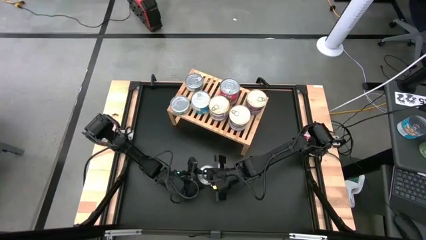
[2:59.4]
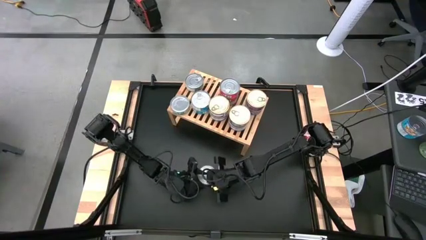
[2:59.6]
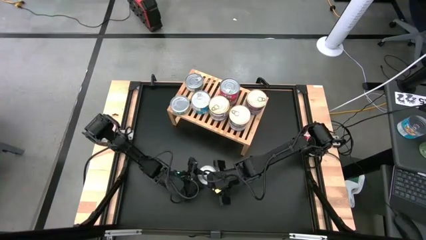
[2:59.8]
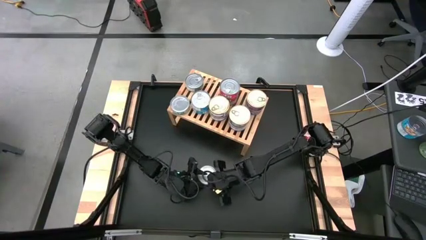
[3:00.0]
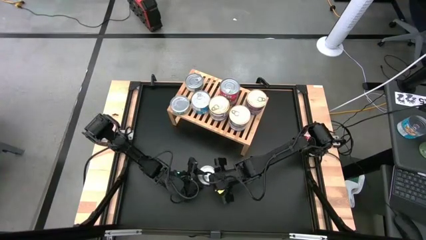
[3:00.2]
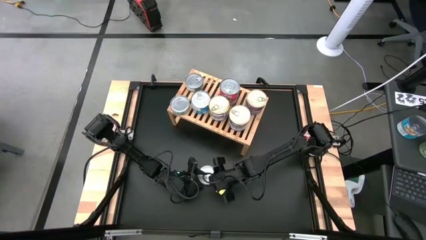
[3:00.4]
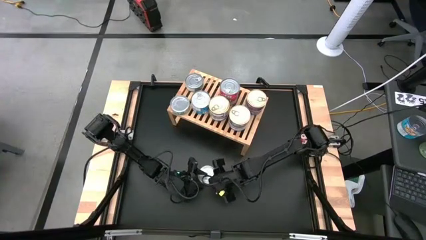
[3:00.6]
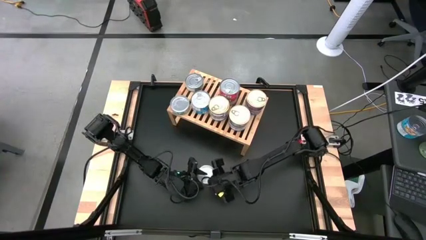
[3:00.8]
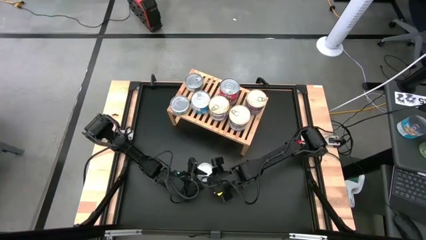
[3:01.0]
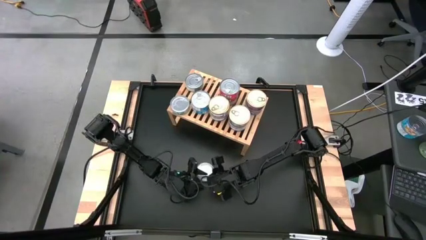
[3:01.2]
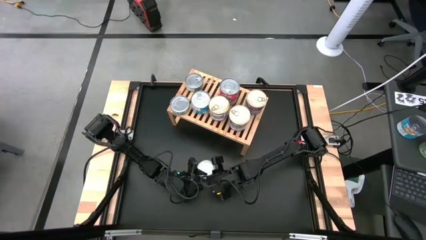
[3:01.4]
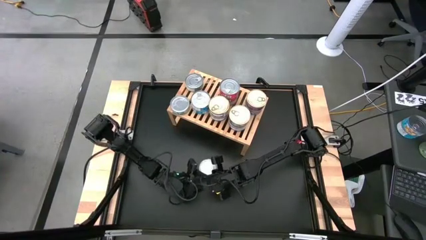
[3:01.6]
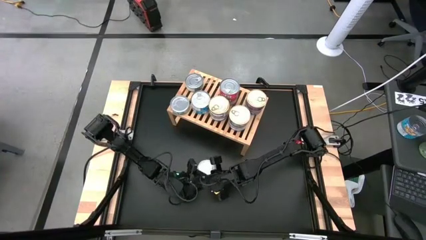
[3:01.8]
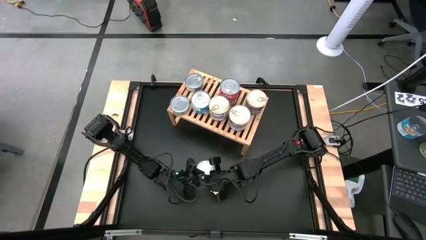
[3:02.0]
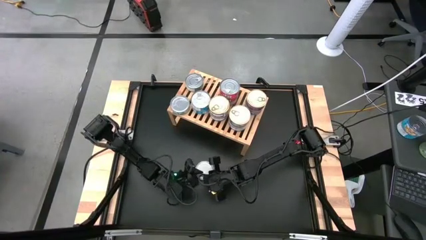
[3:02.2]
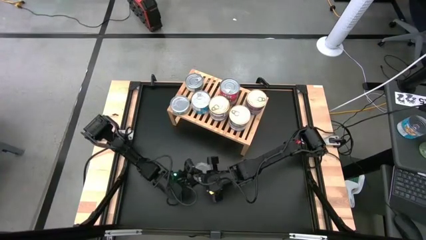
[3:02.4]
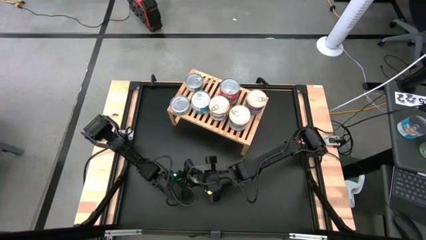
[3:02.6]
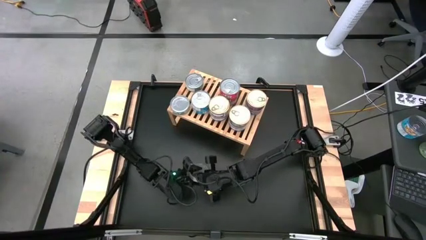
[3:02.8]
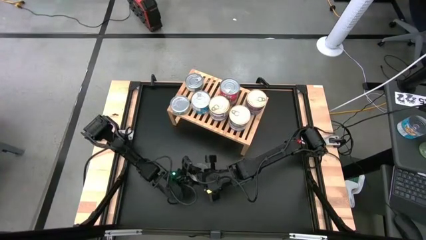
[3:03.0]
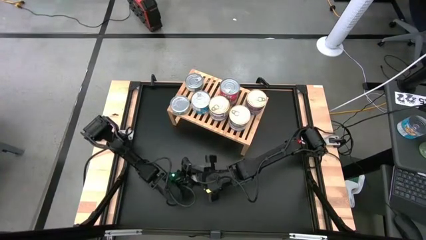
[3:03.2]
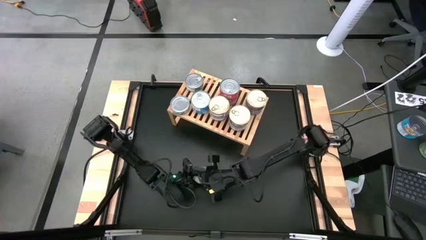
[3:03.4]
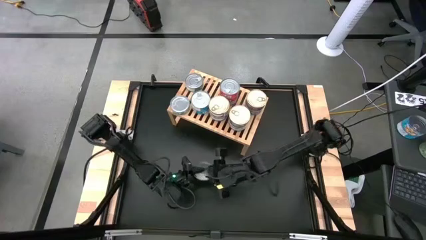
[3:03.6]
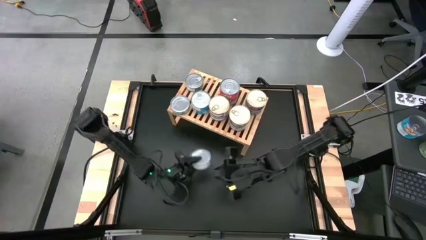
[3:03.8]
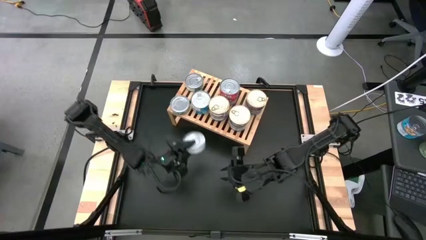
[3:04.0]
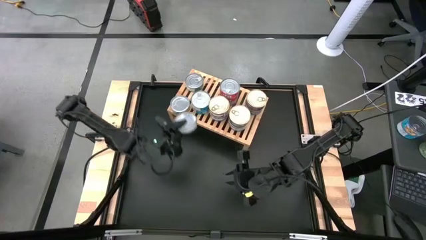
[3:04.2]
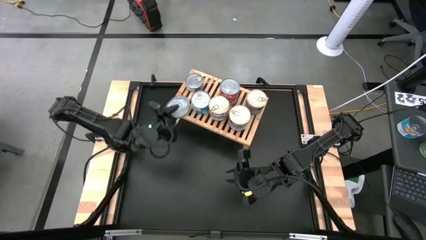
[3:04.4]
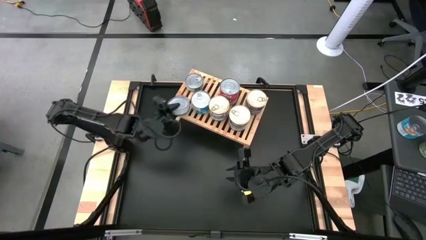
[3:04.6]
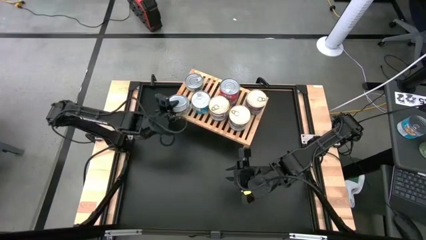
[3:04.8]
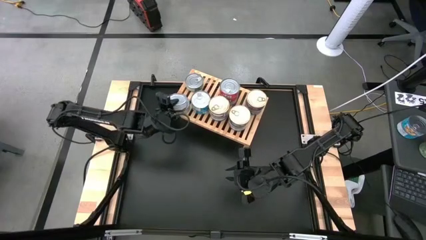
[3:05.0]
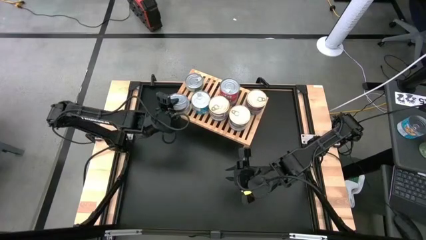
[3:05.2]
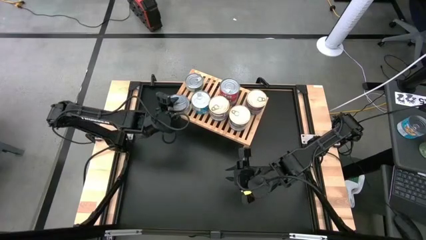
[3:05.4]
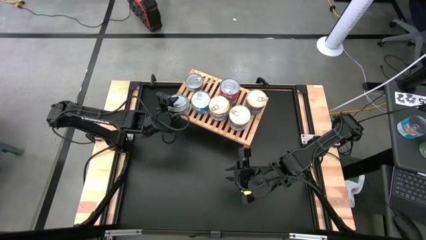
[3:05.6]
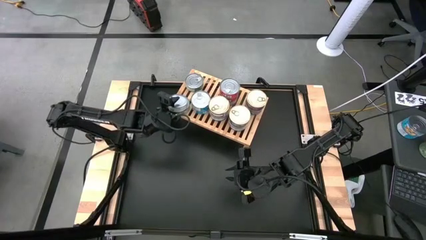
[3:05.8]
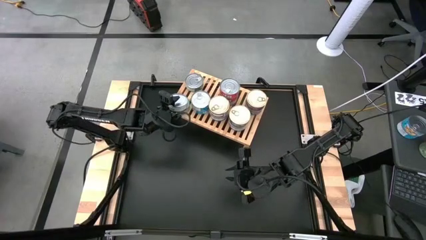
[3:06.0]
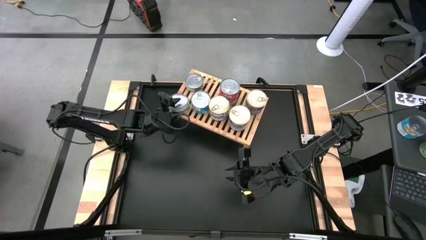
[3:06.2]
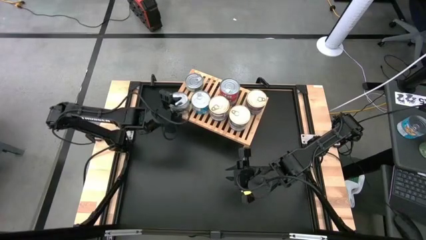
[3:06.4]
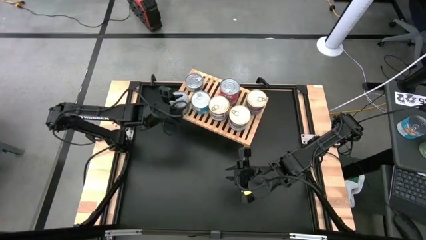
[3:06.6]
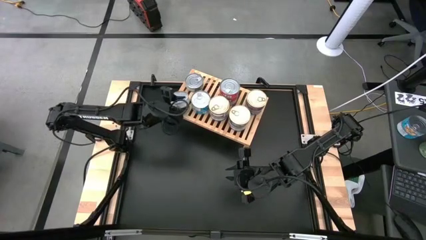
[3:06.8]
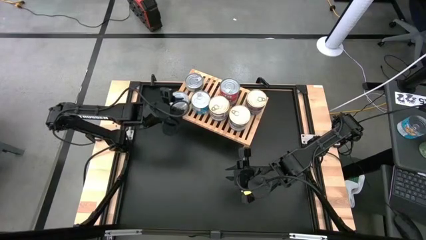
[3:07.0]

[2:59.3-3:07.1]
Task: Stack canned seafood by type on shelf
Stack the green tuna can on top the green tuna can on the shelf

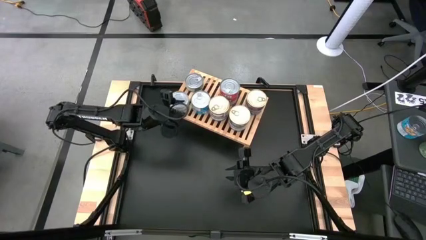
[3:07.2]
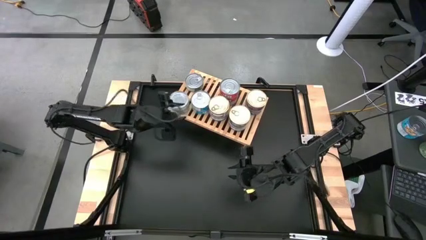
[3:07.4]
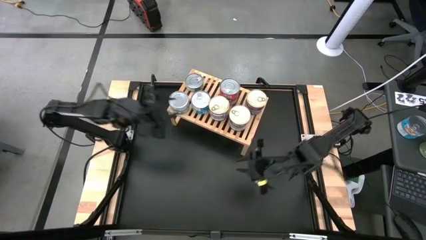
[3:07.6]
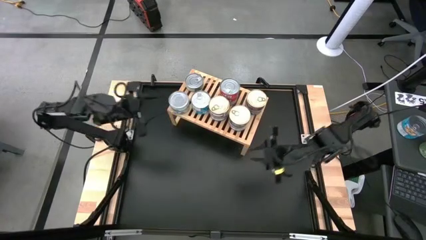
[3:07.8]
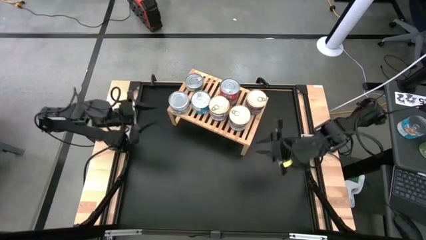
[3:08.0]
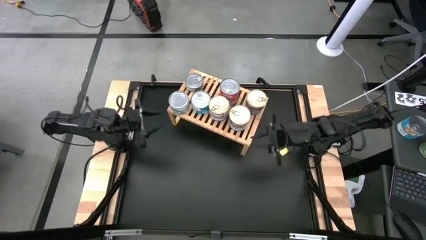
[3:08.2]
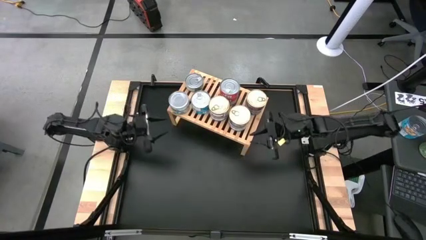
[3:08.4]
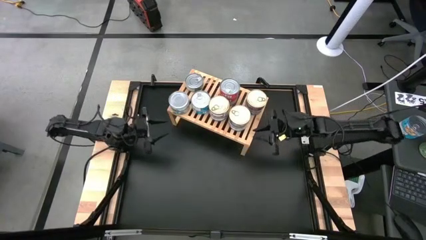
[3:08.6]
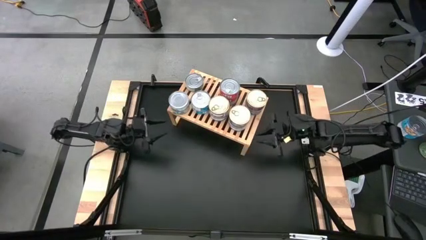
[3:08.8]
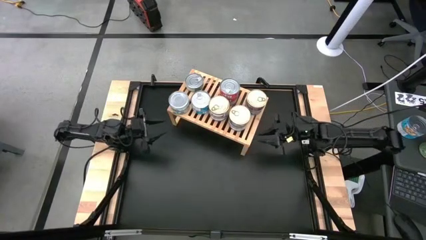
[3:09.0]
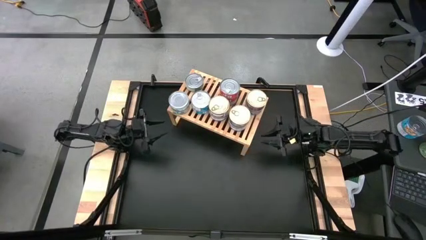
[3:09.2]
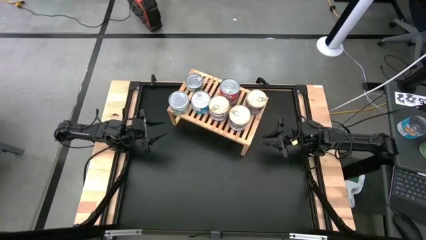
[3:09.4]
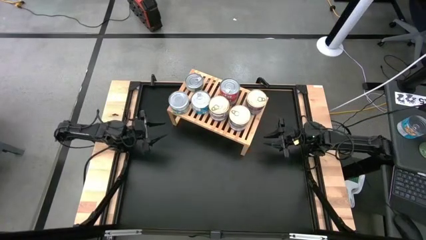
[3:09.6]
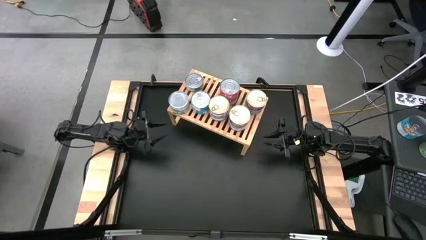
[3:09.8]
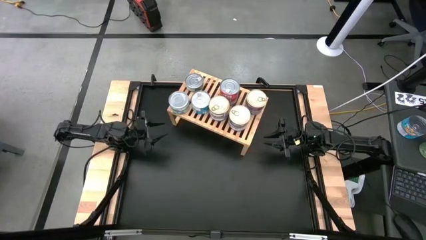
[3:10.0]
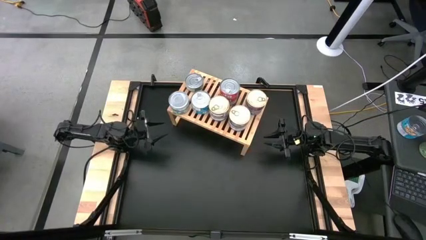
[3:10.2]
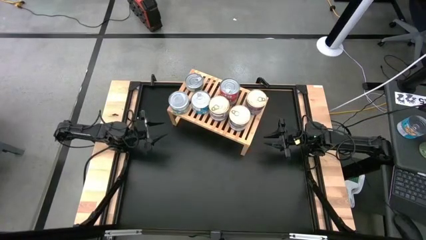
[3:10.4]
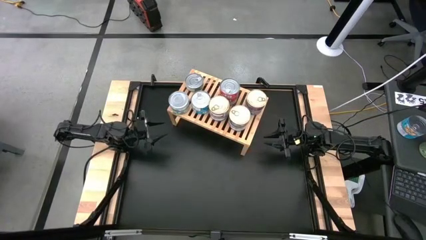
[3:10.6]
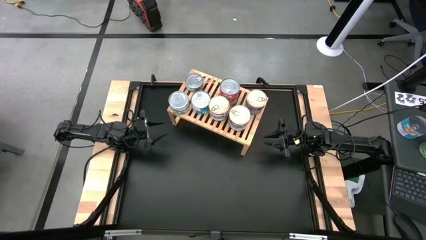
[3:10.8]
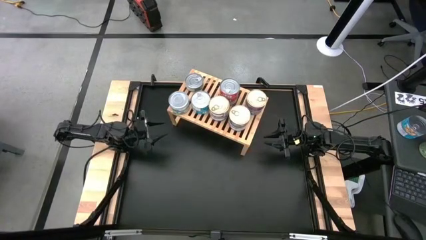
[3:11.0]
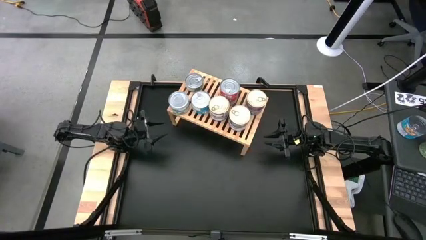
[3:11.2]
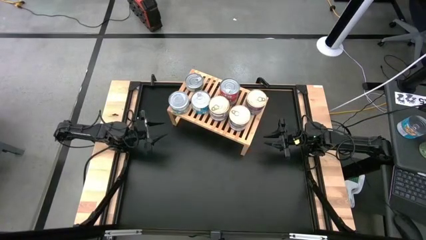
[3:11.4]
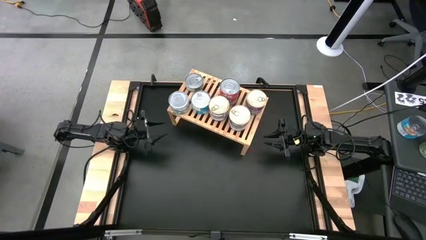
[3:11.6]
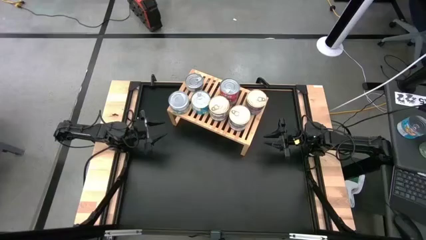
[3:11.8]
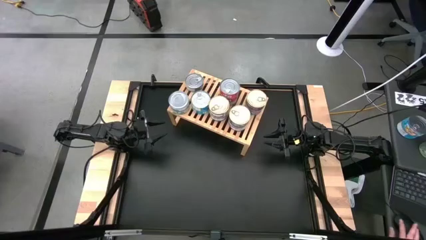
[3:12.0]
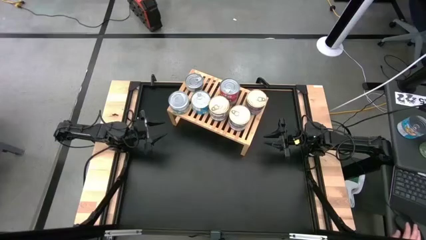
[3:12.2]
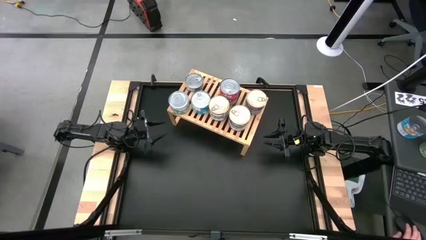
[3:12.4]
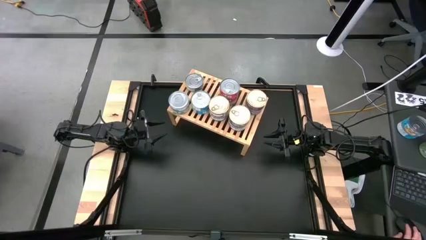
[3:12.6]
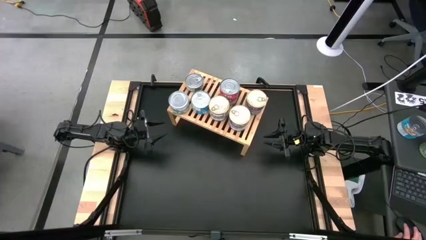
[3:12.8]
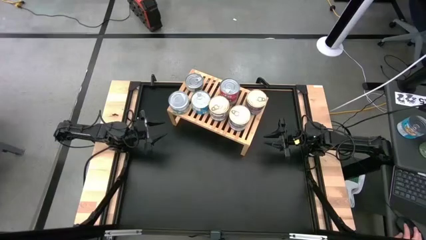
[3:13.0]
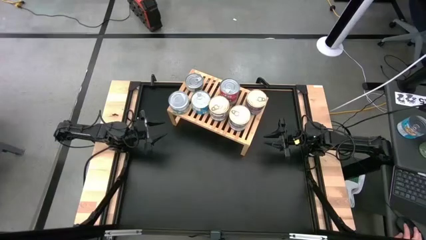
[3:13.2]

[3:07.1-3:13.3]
Return to Home Position

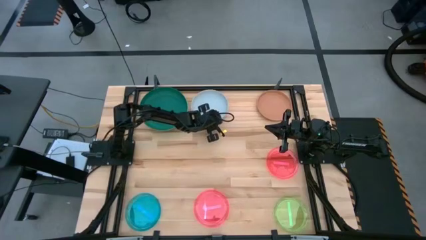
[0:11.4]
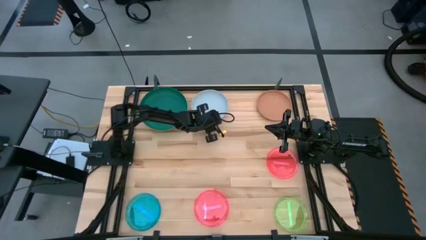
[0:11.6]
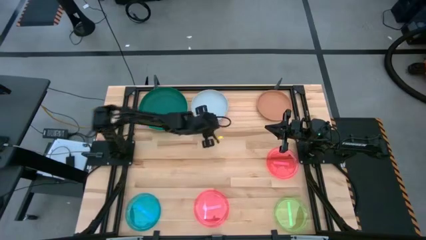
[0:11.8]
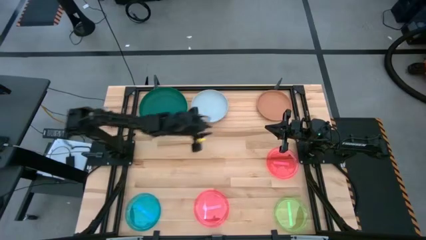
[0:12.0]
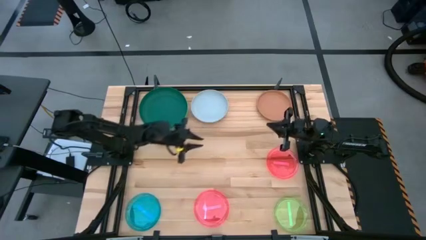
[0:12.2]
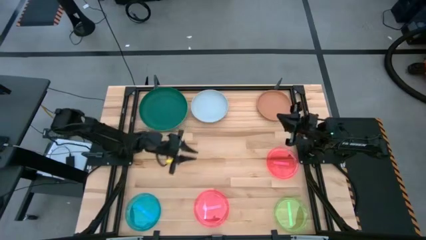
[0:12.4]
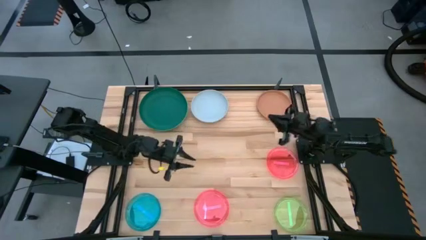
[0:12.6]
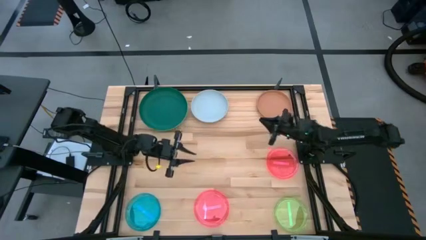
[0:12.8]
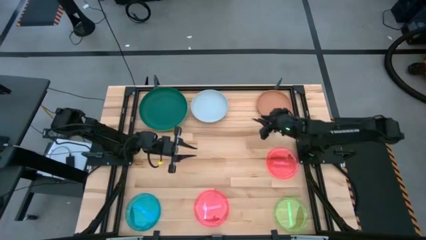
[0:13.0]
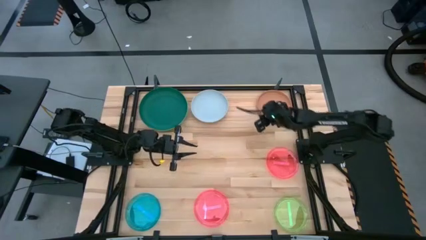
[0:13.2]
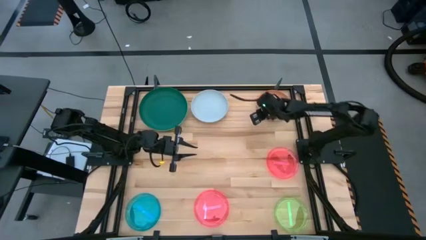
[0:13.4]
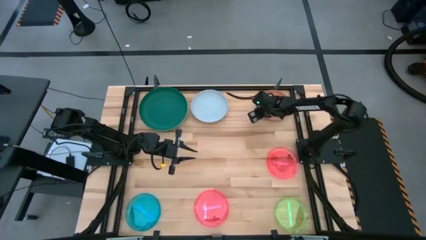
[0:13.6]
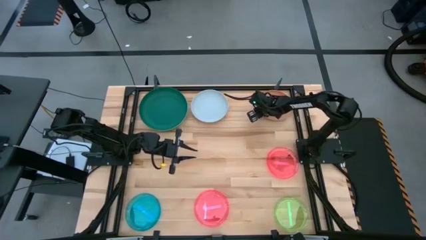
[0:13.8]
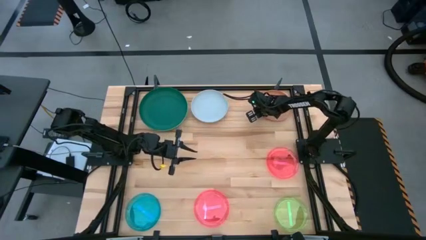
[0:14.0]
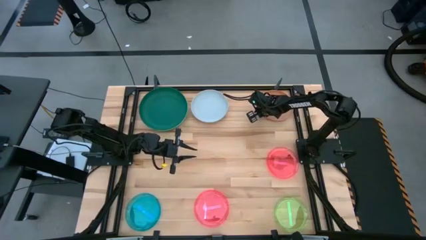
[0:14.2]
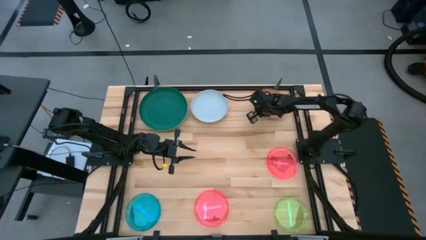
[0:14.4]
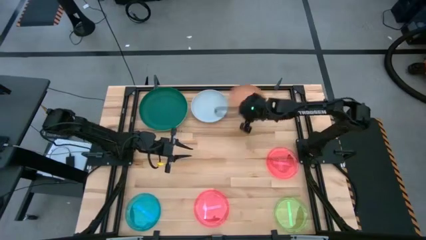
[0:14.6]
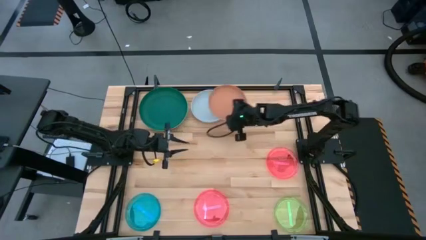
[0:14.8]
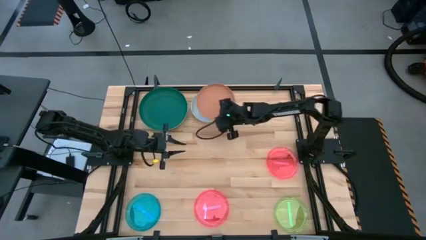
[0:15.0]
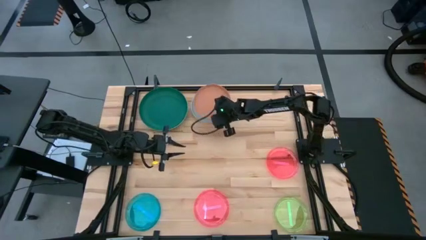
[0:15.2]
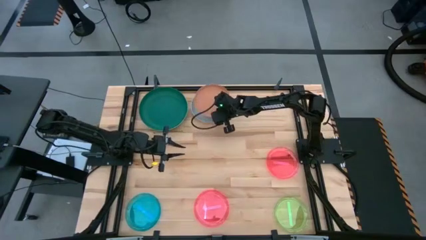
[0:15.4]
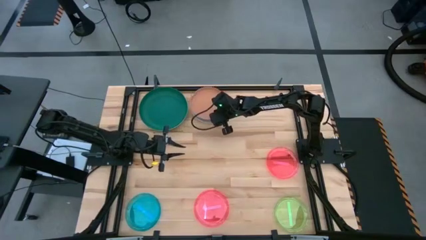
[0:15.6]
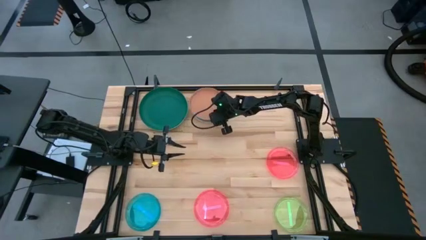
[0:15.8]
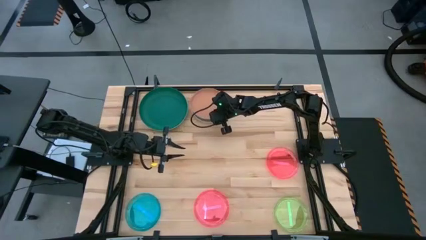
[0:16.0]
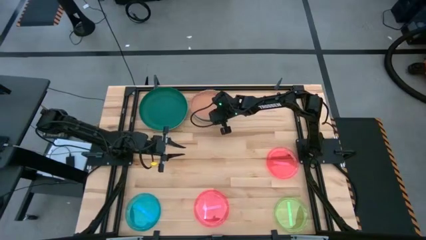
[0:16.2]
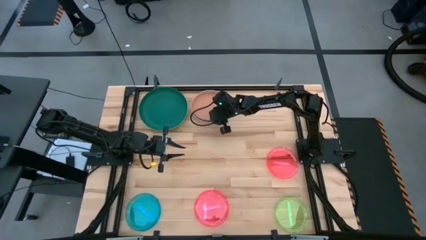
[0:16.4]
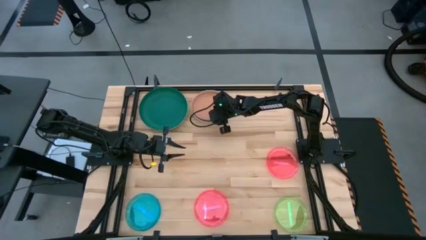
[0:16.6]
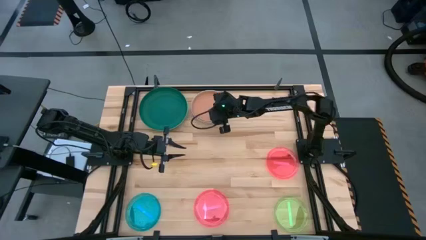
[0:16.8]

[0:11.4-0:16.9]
Task: Stack plastic plates
Stack the orange plate on top of the blue plate
